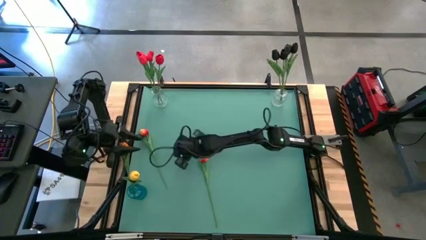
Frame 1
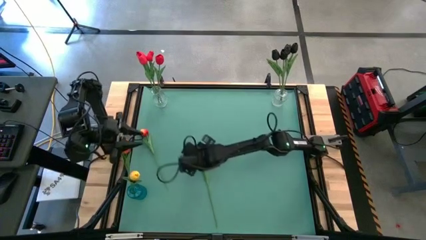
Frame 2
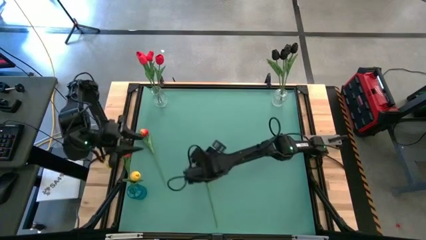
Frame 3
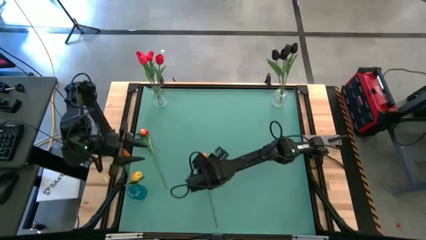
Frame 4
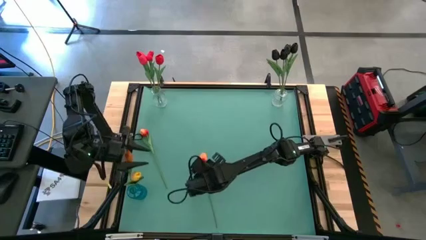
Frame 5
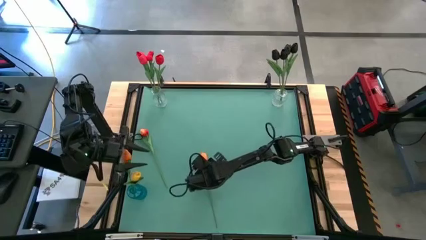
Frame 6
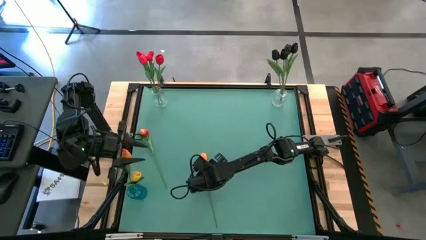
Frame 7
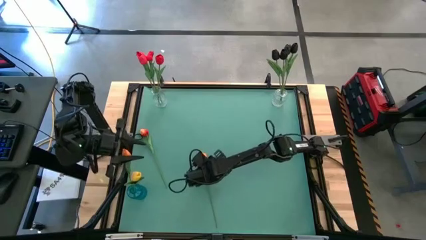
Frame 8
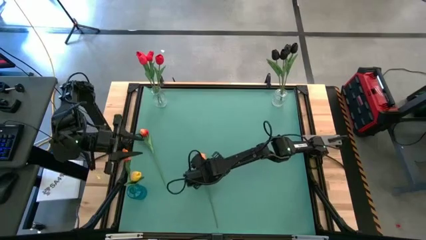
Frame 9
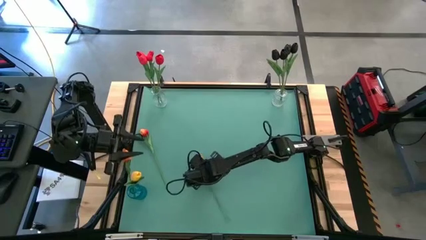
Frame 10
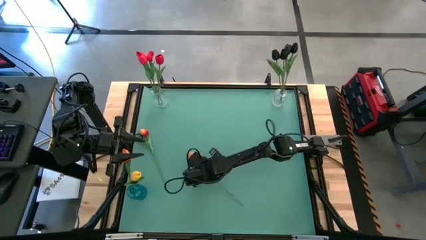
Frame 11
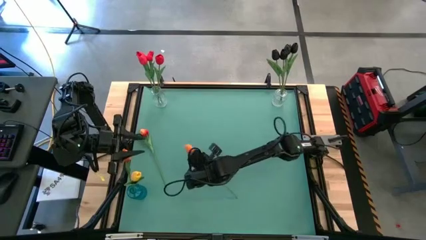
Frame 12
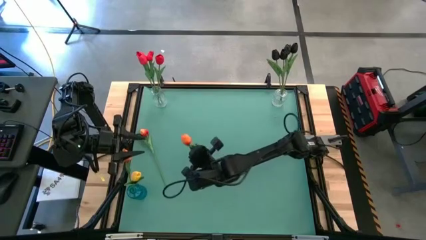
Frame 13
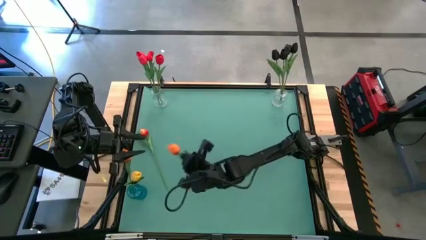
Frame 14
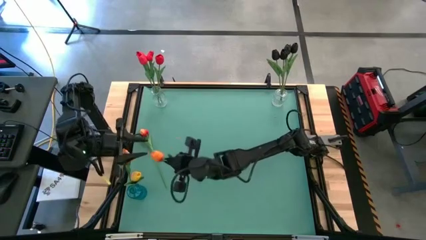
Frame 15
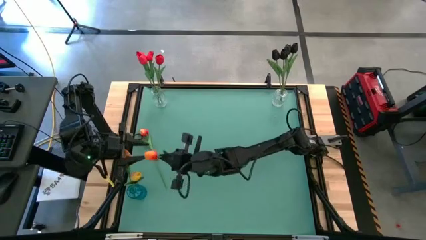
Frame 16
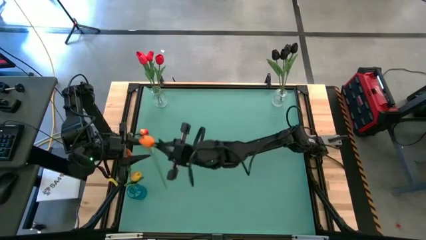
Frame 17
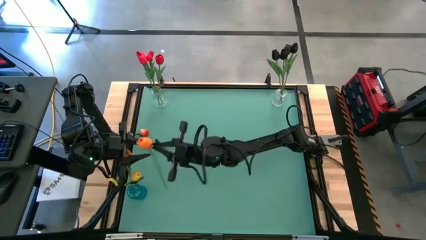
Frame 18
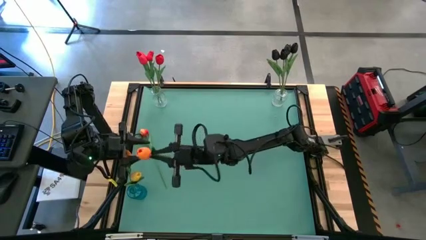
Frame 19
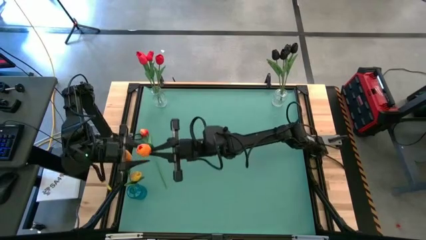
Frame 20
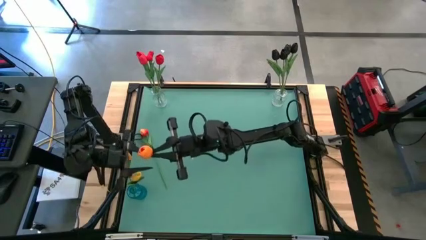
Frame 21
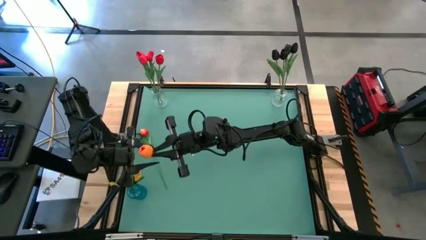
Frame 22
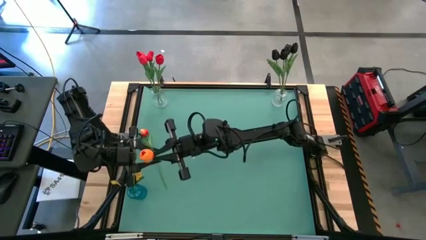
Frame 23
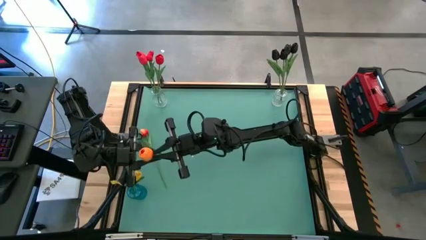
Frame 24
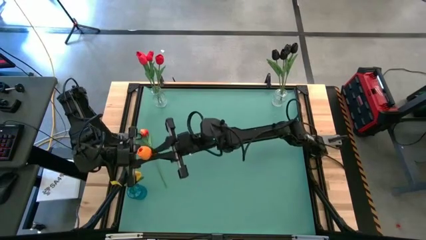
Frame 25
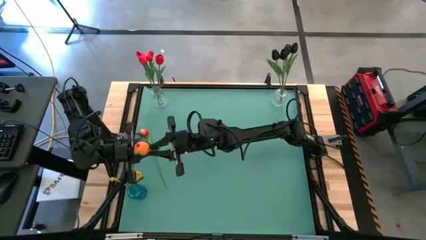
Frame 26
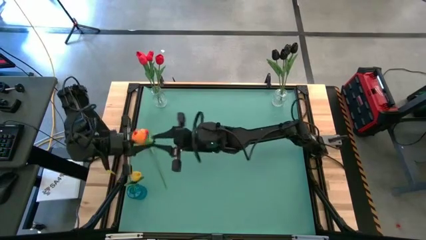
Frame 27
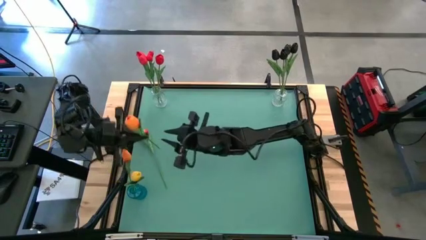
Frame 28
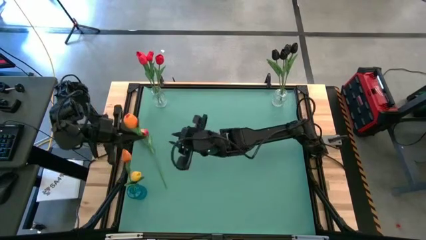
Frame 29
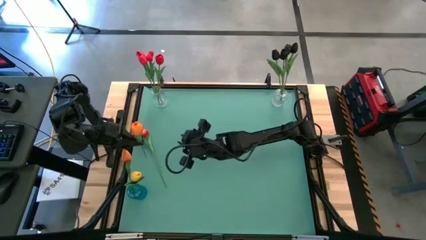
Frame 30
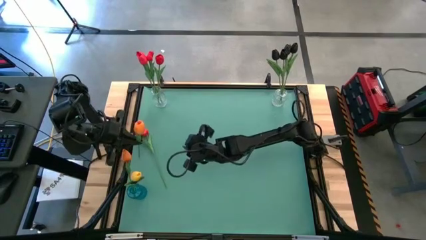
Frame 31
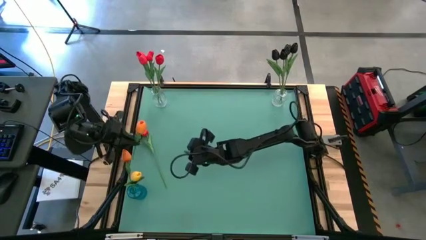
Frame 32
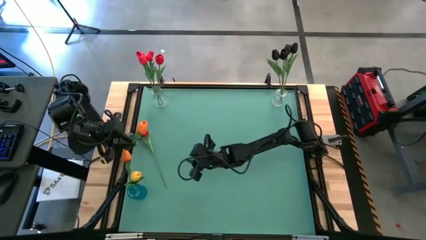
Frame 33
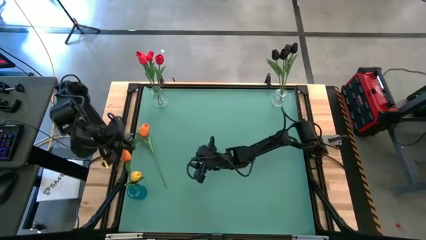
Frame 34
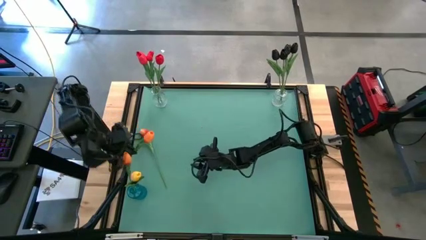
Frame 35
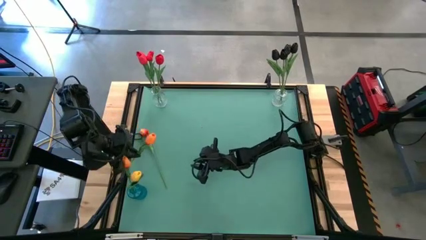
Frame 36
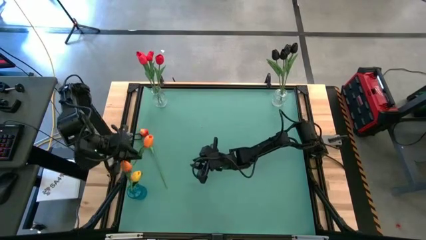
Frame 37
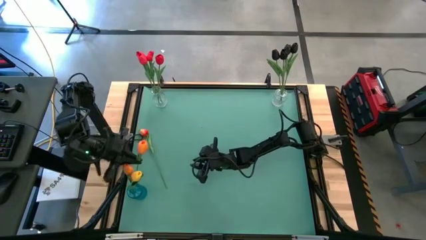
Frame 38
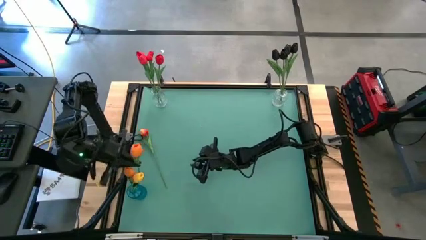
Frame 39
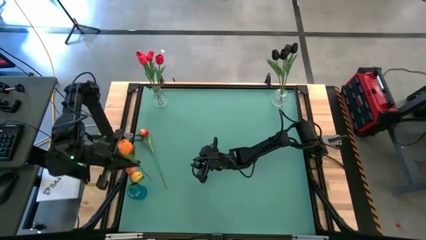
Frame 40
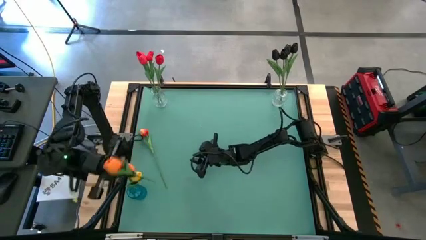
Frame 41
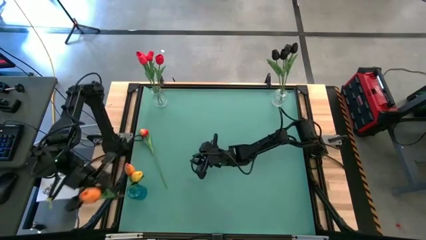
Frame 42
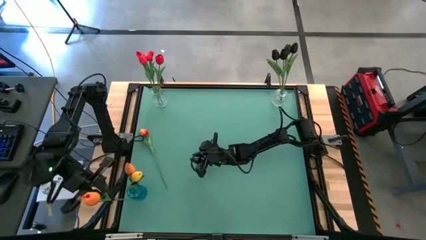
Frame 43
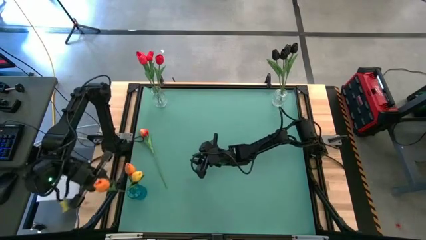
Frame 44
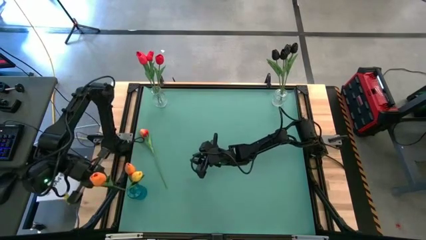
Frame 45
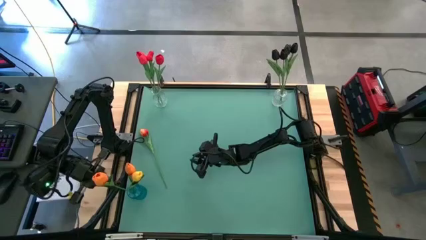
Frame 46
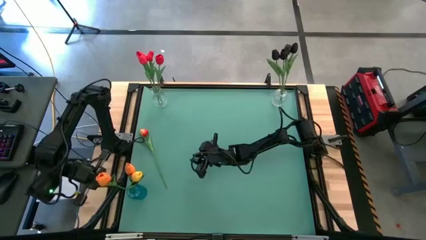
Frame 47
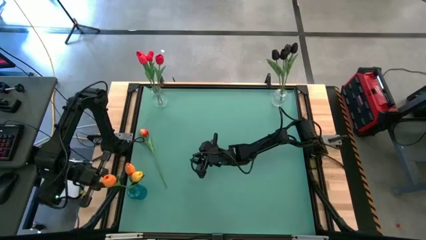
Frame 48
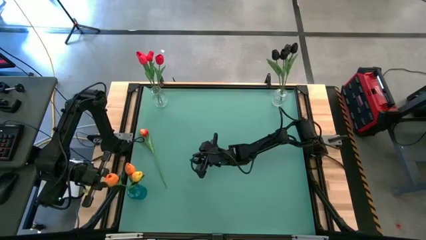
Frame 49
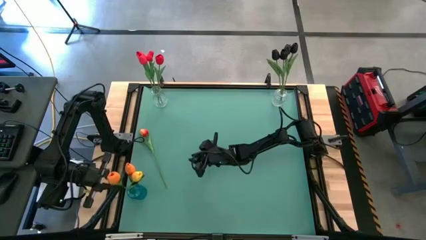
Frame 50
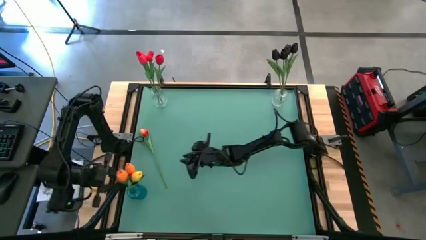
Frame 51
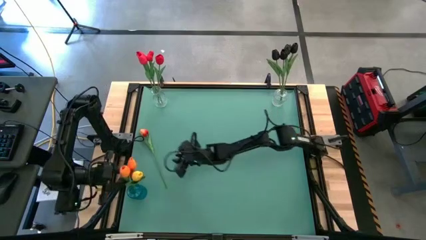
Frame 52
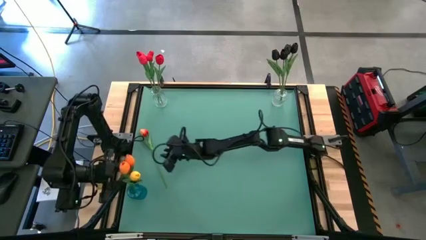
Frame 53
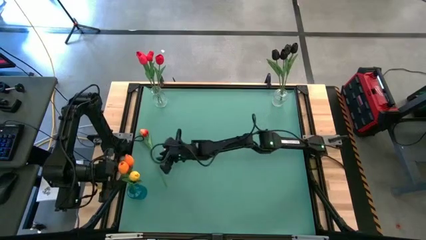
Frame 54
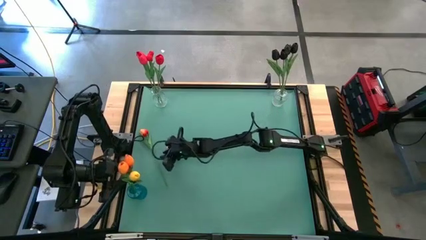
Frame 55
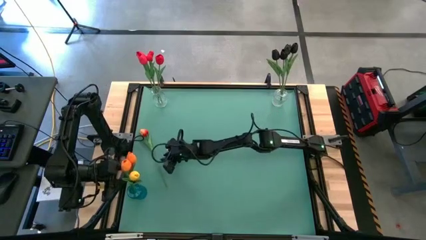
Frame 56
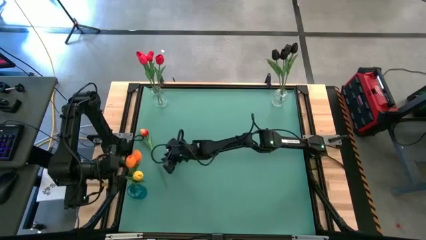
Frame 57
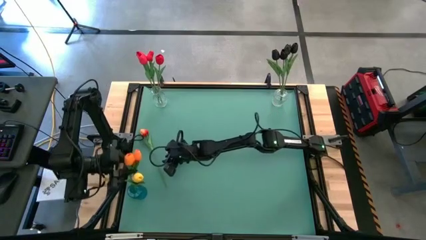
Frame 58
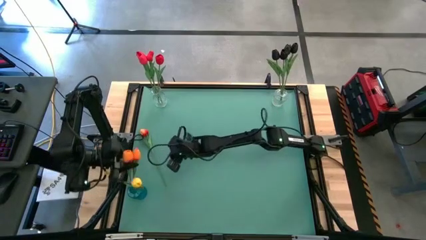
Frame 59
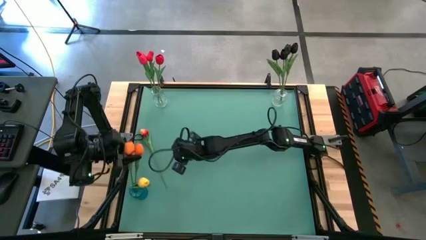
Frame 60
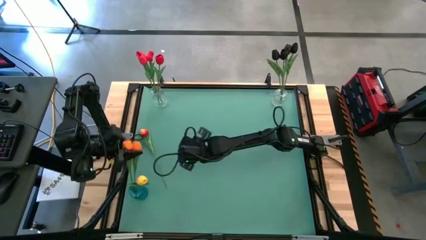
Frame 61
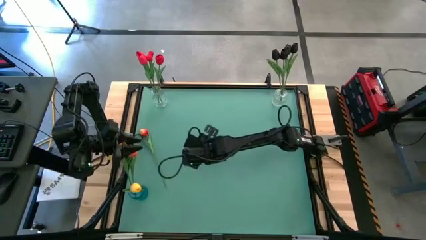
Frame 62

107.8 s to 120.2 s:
Task: Sort flowers into vase by color
Put the orange tulip into the blue vase

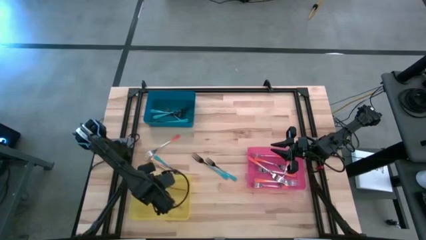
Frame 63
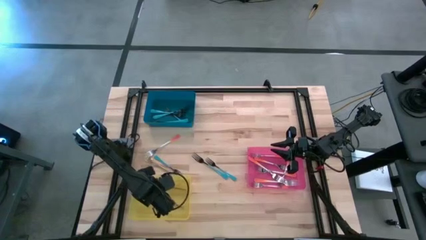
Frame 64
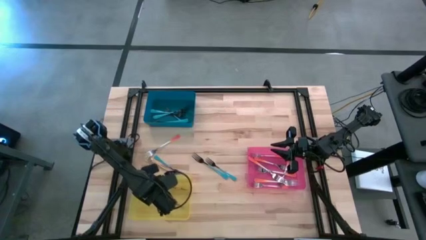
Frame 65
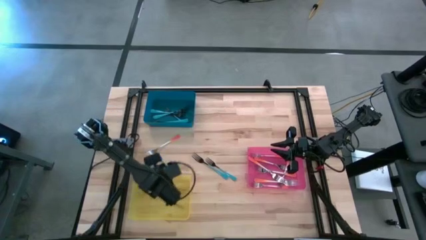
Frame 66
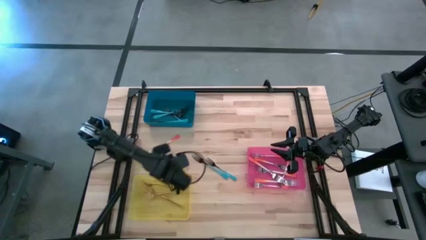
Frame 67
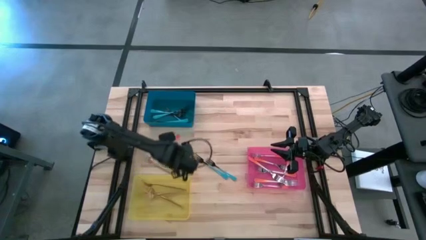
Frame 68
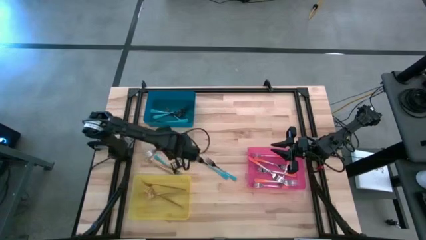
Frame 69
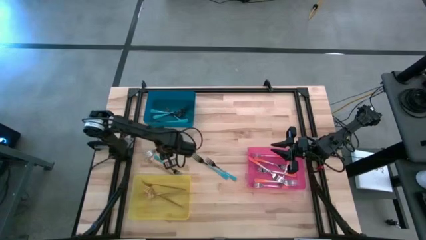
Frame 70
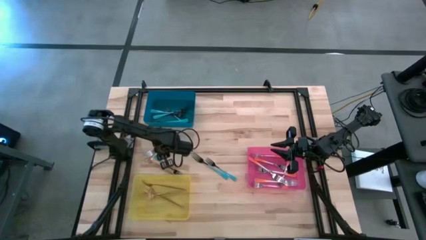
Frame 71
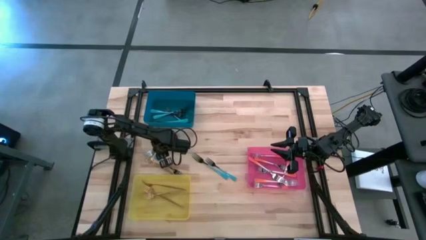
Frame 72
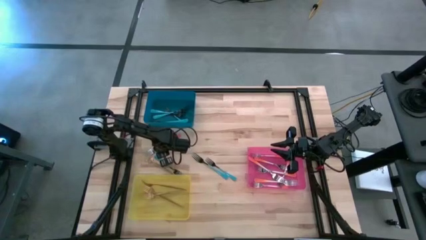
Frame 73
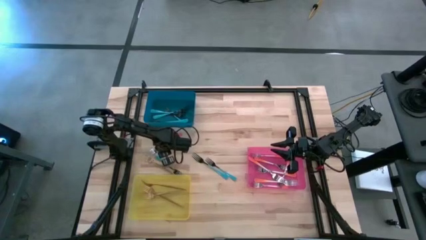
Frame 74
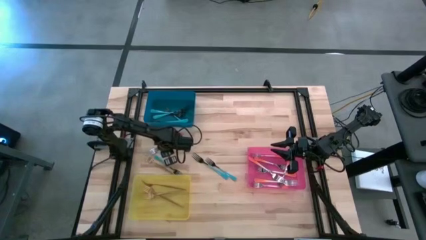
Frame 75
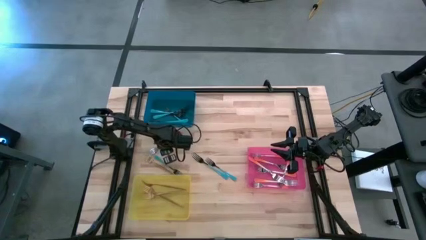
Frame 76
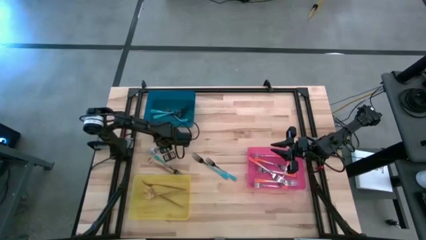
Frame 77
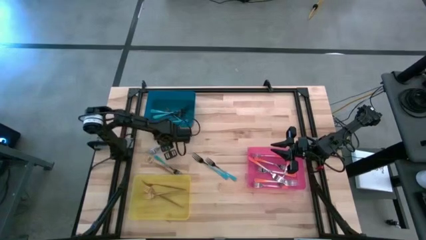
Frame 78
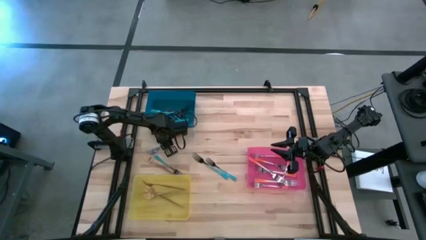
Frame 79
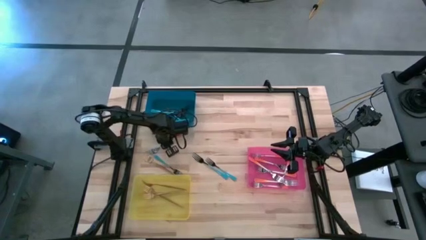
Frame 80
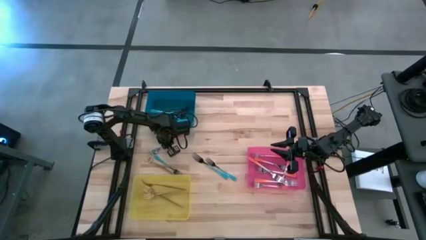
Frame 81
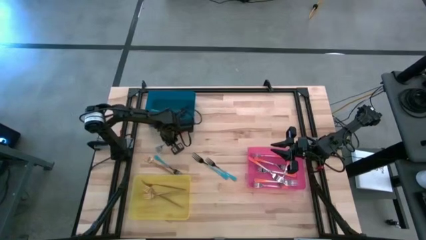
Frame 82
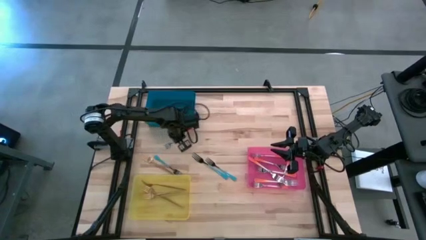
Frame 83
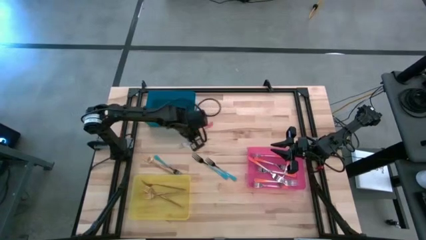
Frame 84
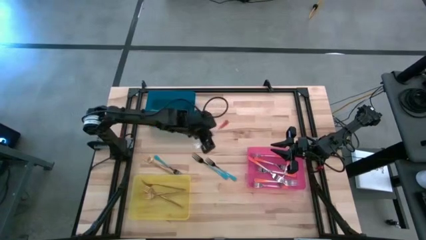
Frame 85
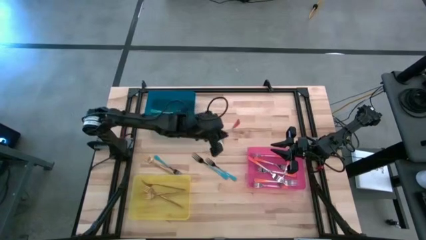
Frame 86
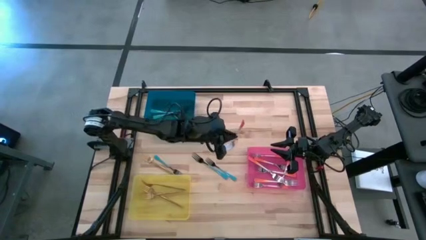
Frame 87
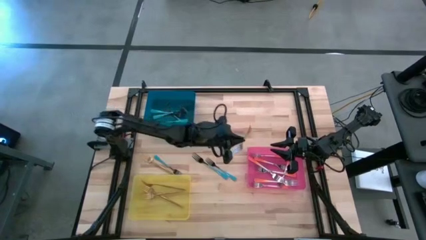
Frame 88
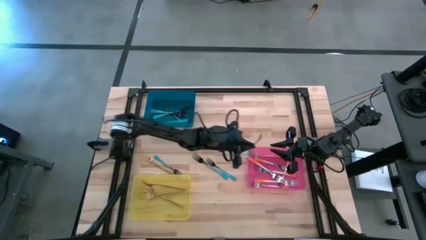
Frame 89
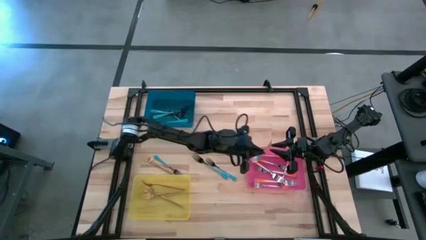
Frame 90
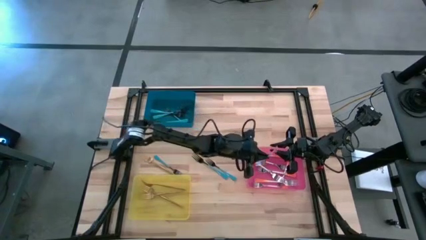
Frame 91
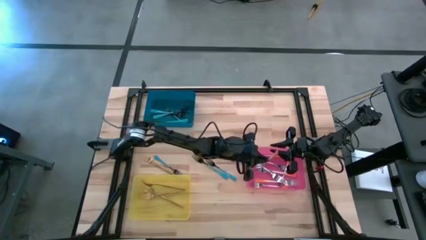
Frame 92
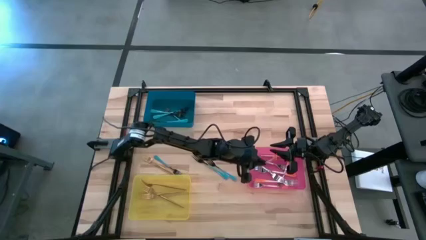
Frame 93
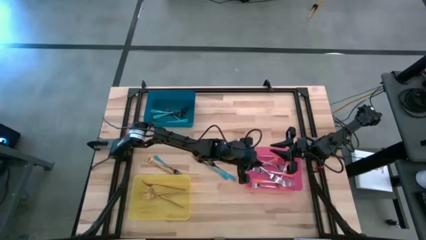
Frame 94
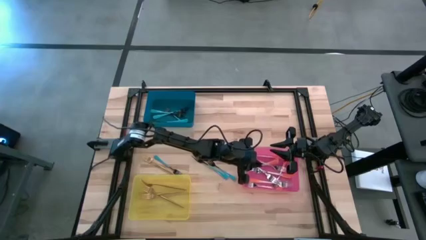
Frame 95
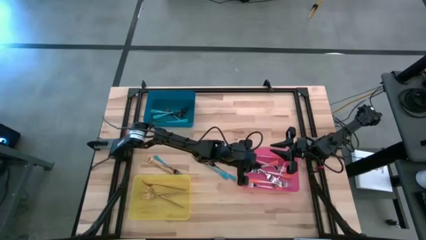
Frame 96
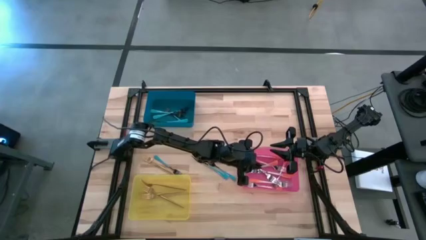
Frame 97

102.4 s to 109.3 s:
Task: Sort silverware by color (type)
Put the orange fork into the red bin
